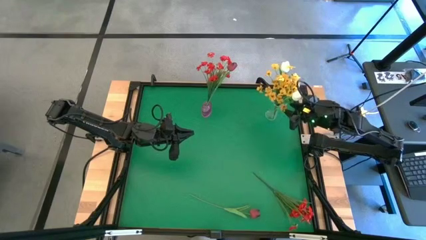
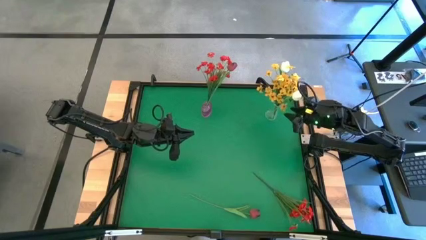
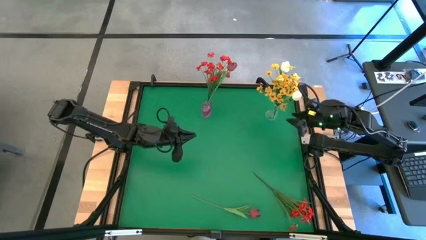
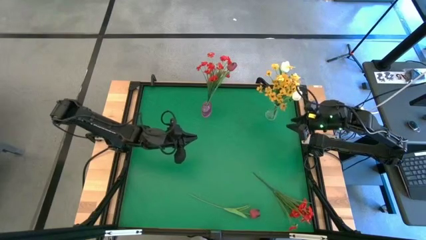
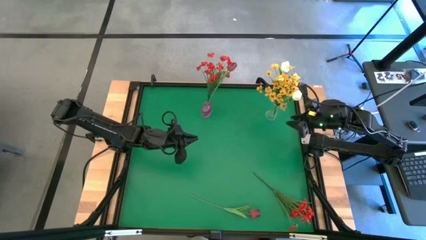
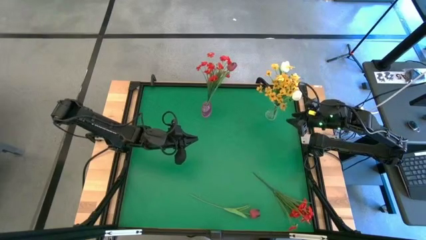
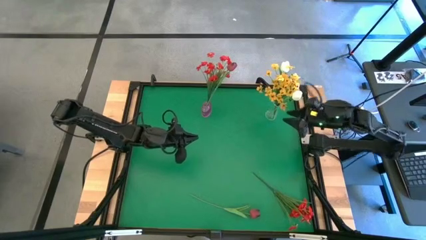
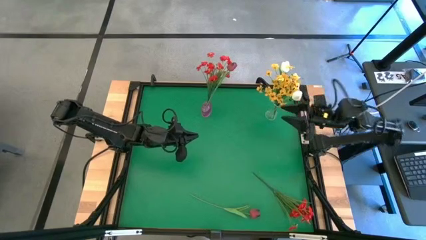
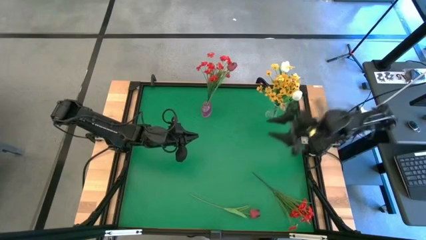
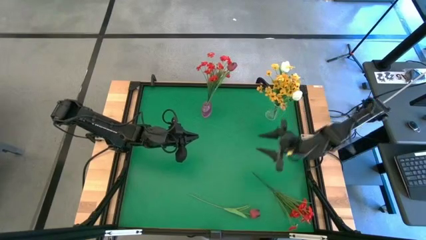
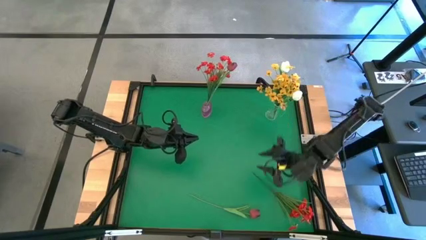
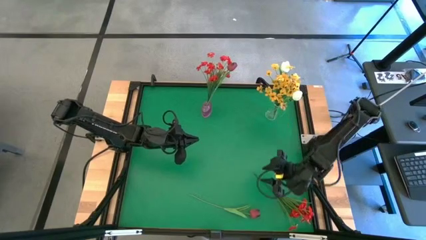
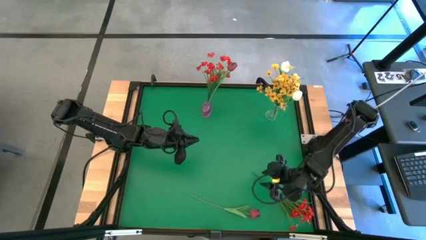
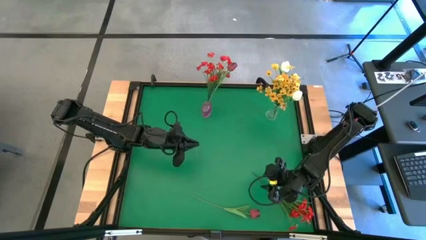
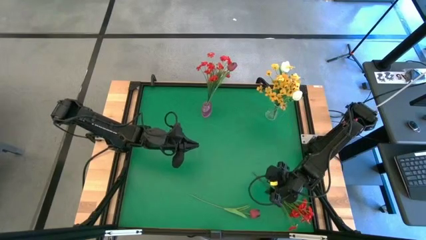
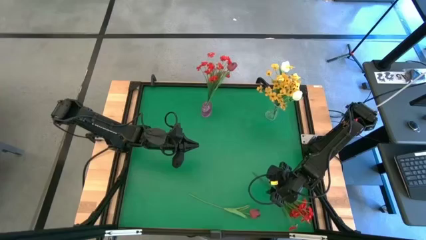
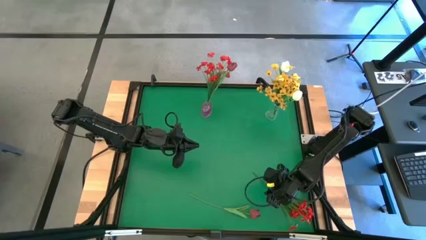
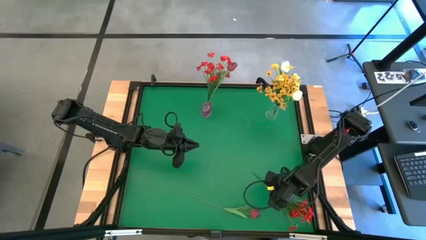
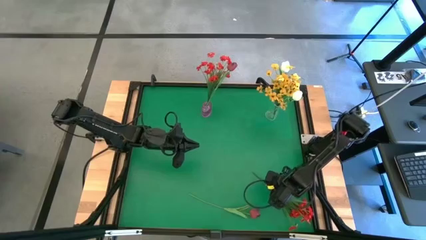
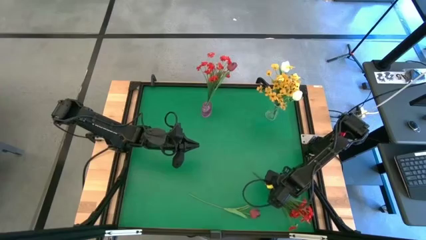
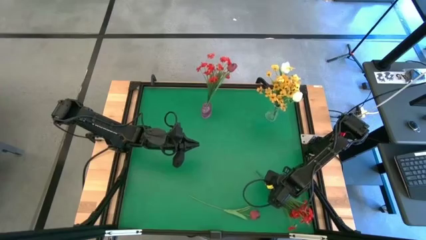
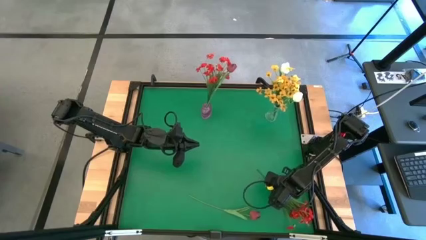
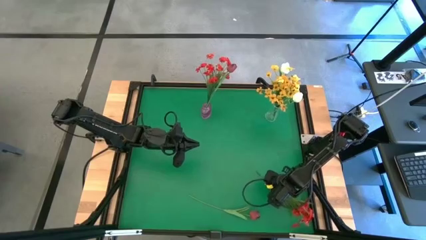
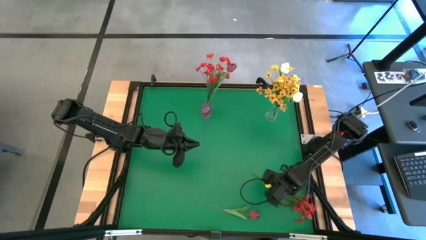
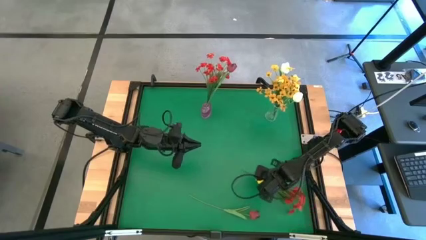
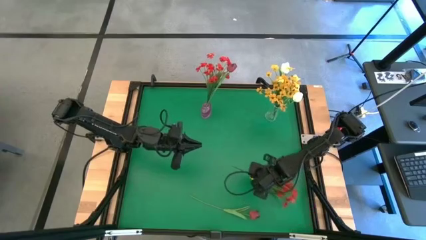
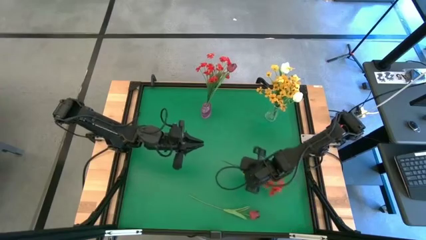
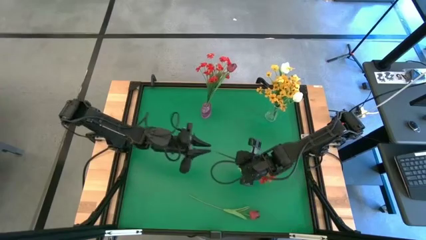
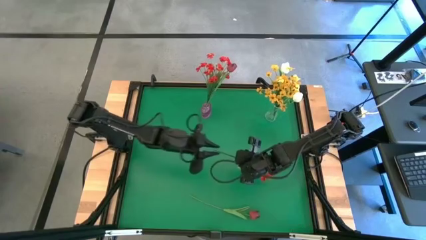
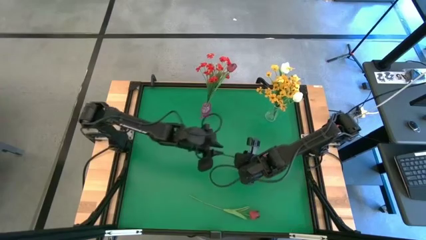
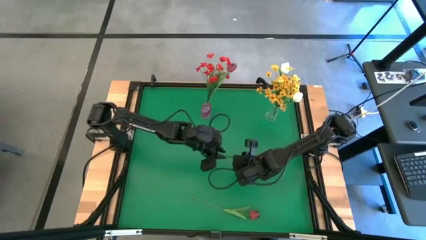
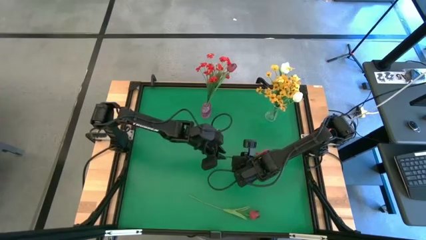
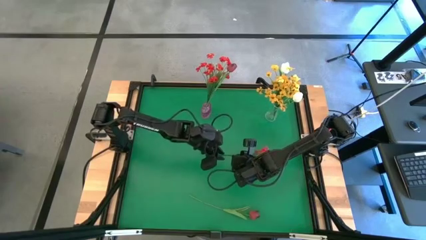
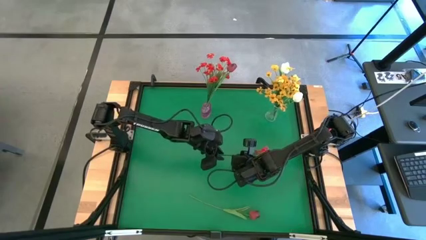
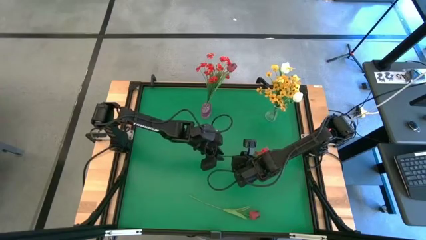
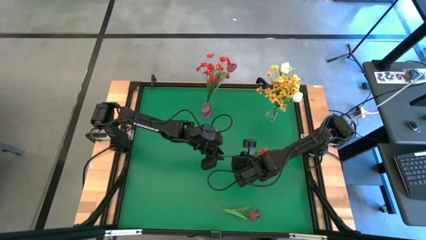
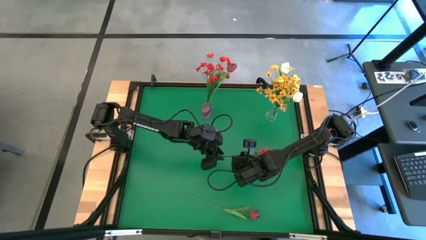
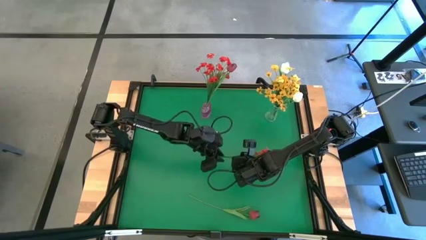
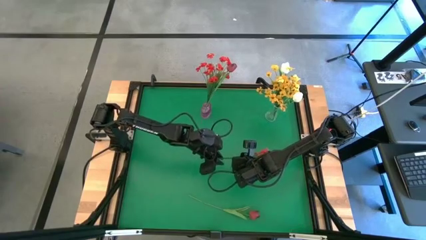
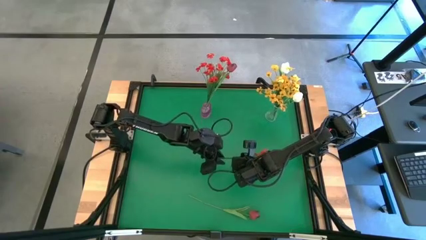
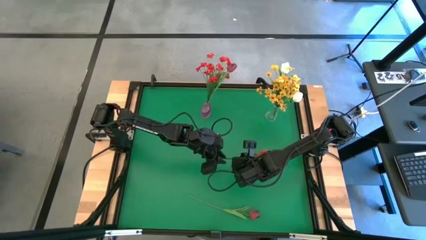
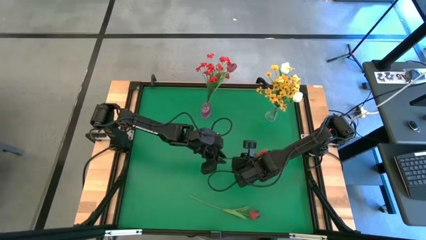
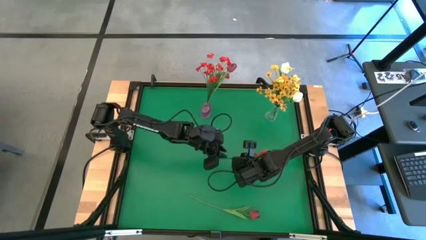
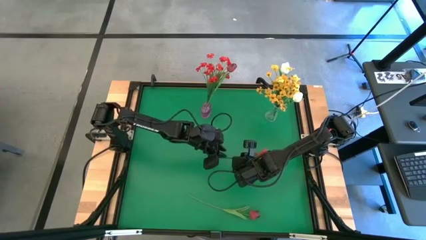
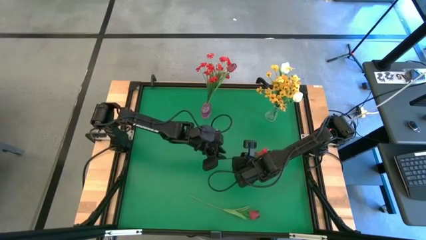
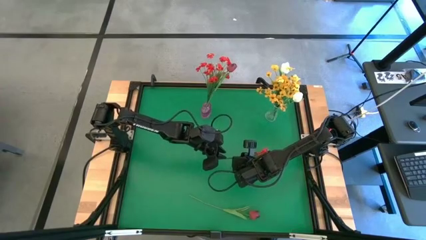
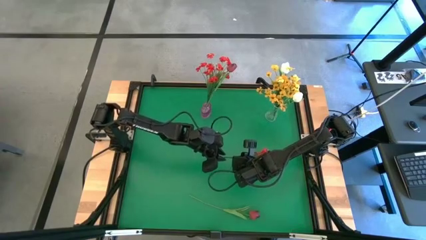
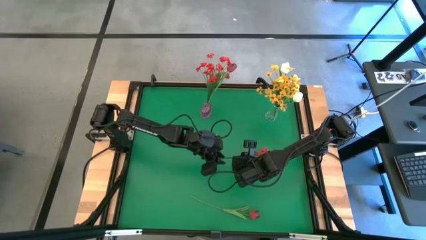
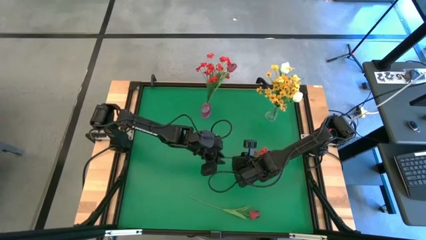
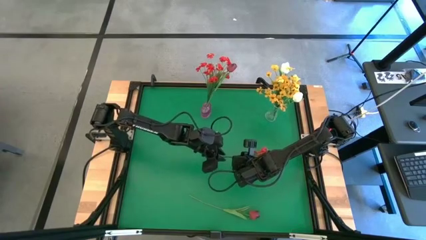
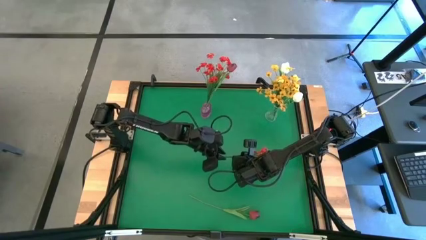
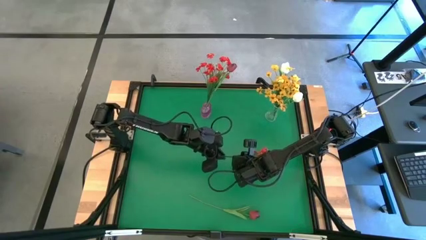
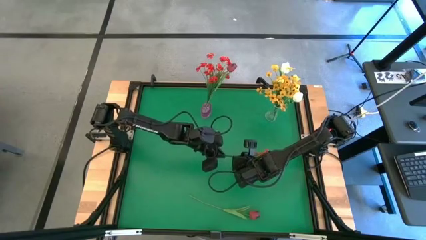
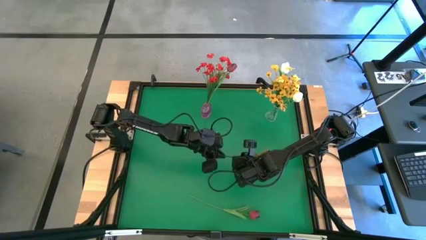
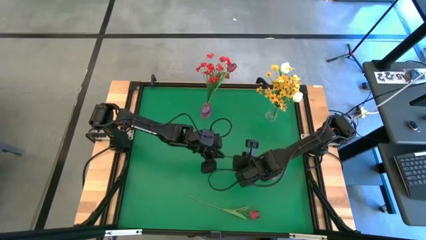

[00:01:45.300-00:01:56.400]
Task: Sort flowers into vase by color
Put the red flowers into the pink transparent vase

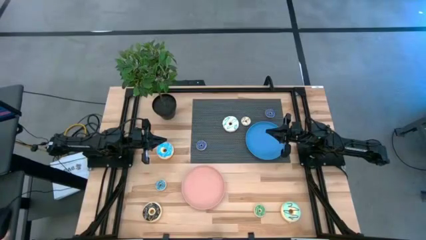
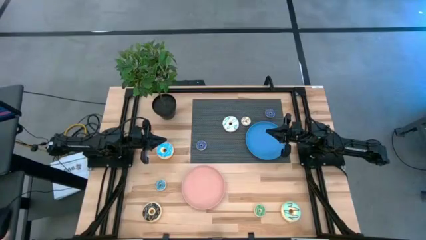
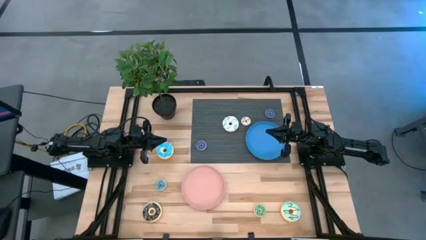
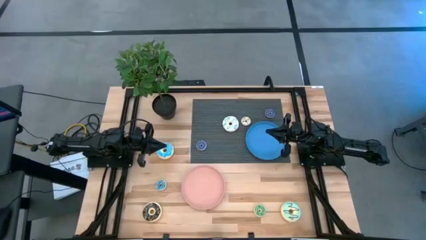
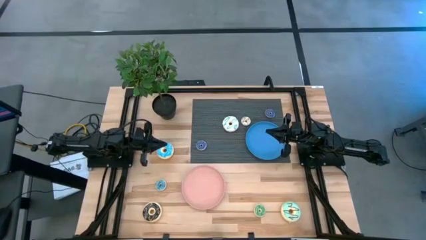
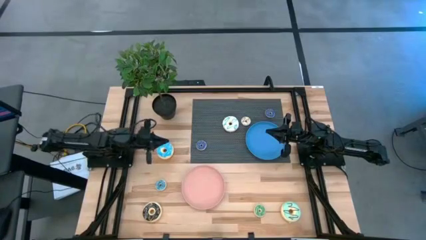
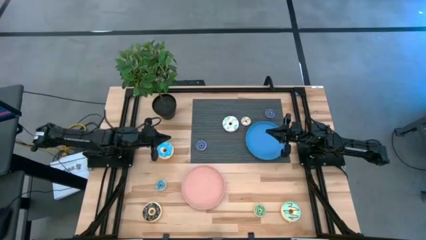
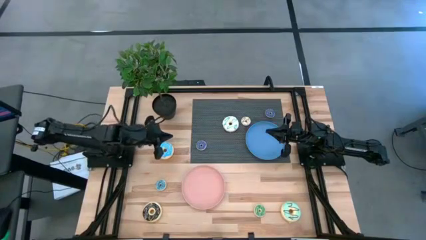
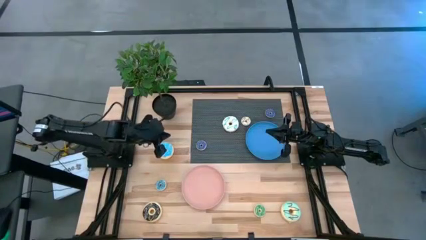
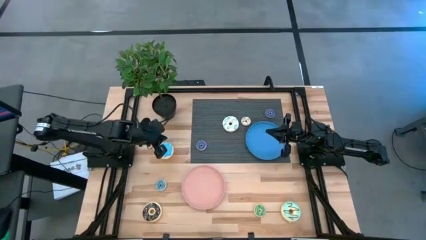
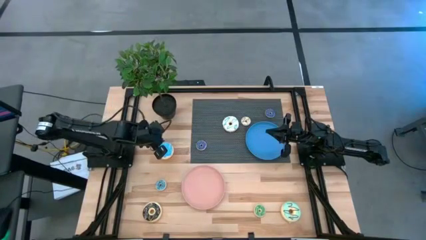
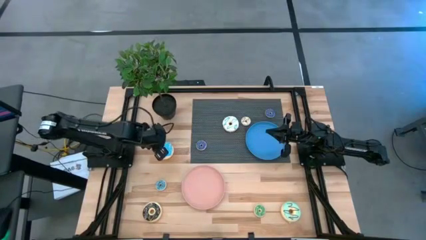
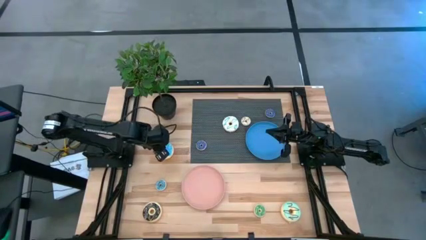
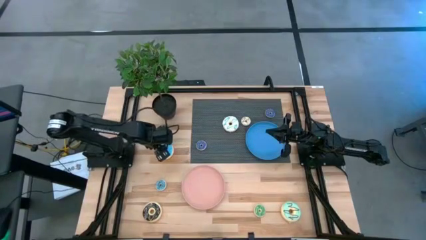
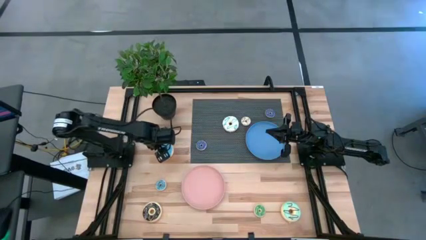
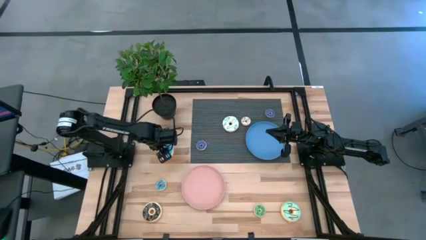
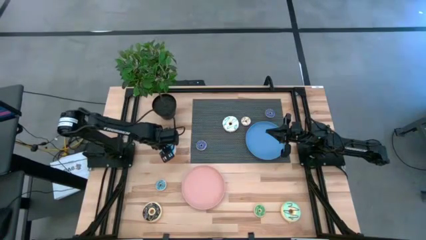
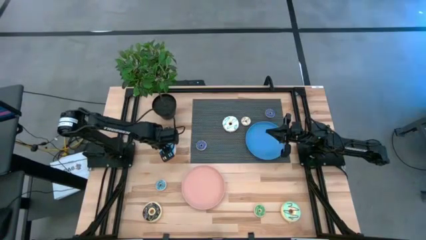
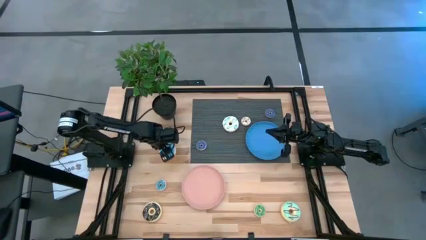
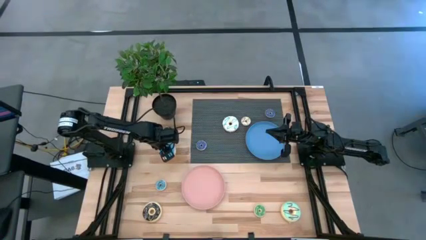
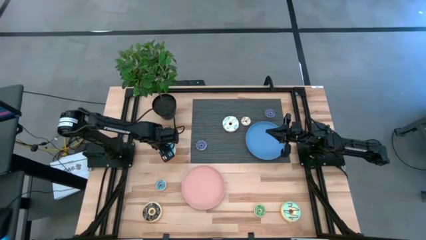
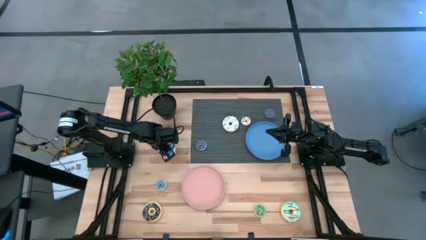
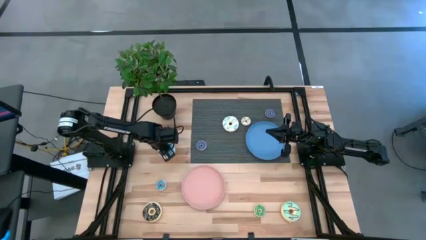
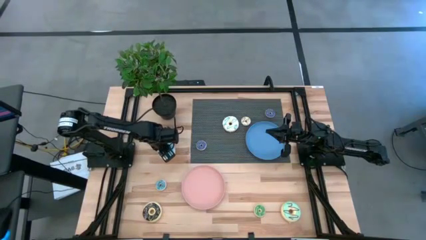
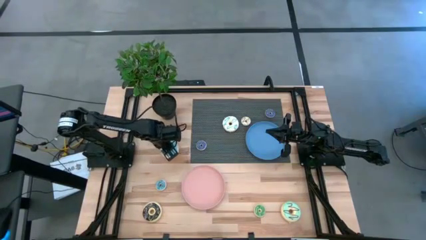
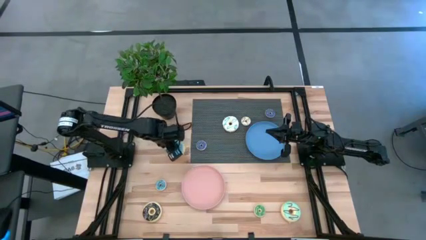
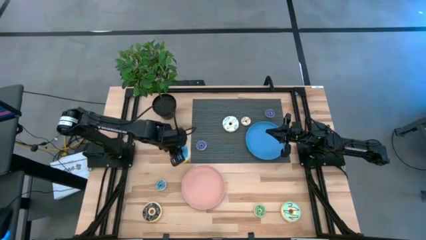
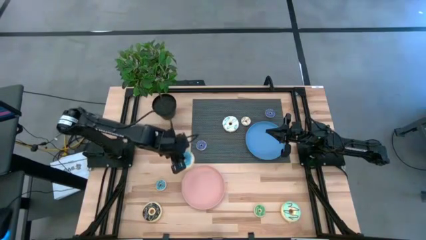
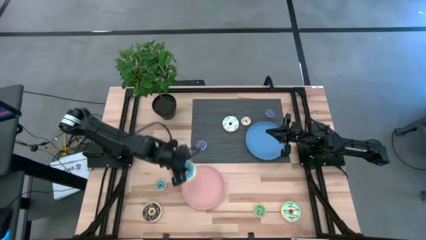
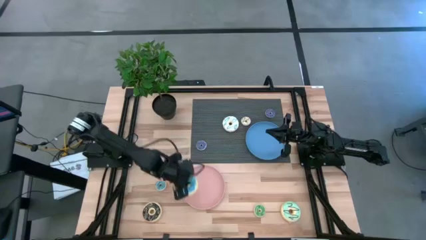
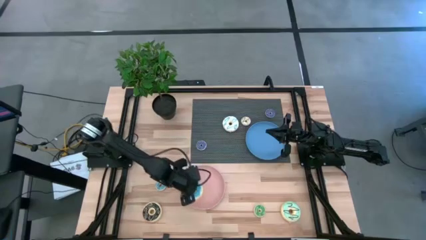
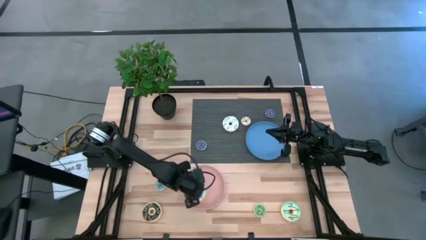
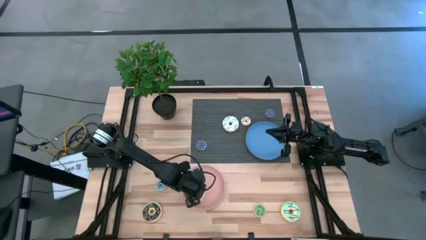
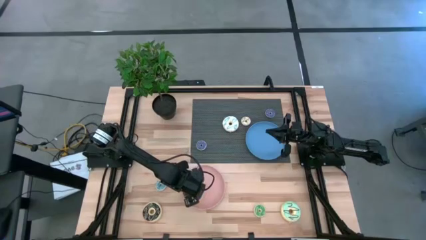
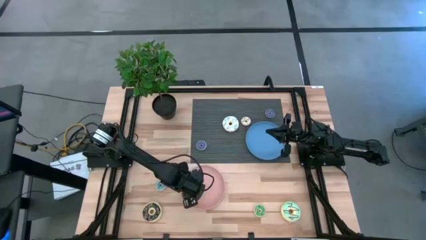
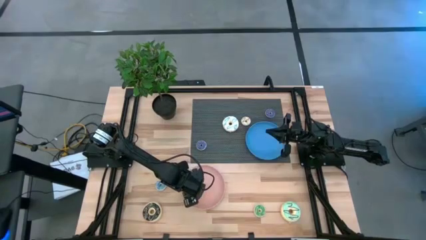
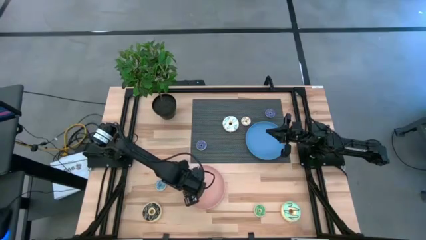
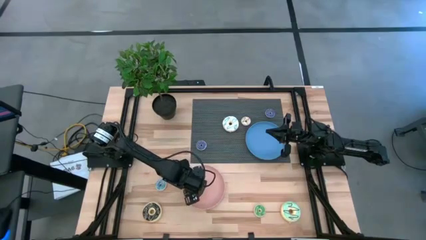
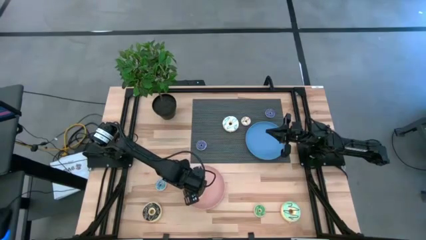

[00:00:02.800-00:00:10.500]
Task: Pick & Place donuts
Put the large blue donut onto the light orange plate
